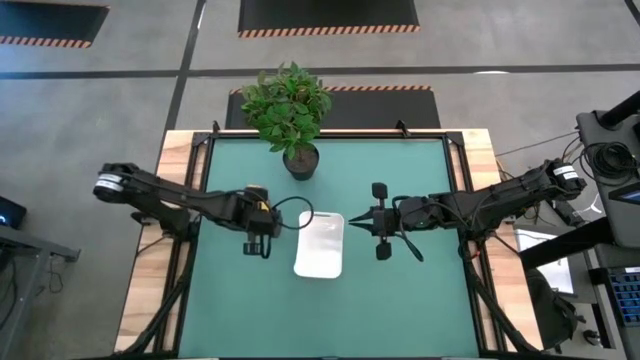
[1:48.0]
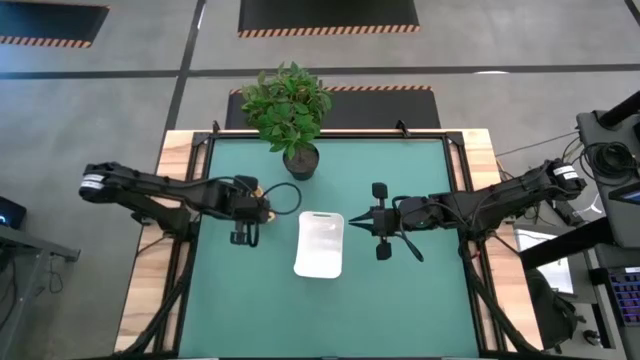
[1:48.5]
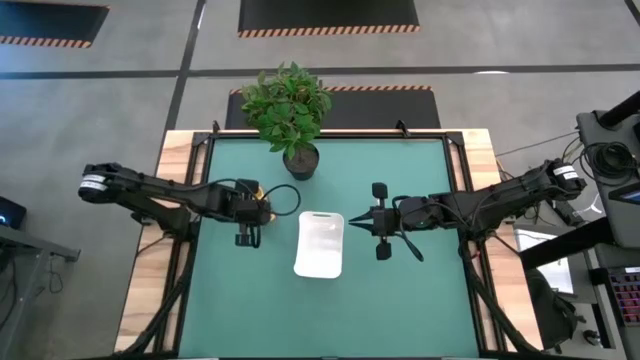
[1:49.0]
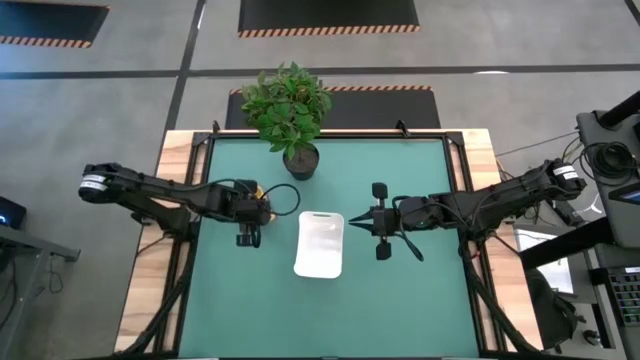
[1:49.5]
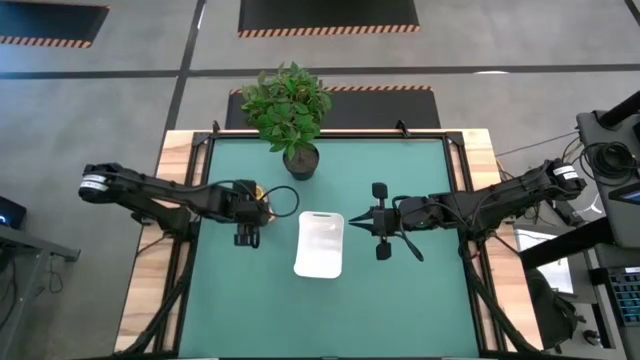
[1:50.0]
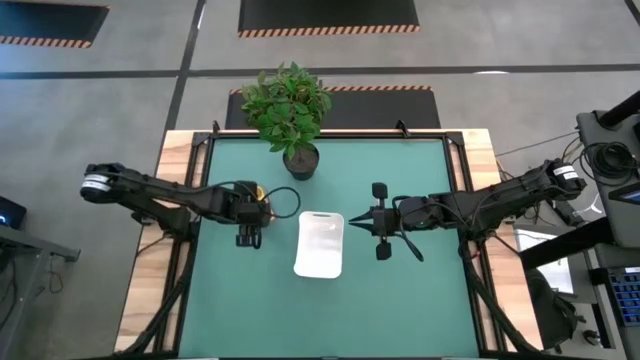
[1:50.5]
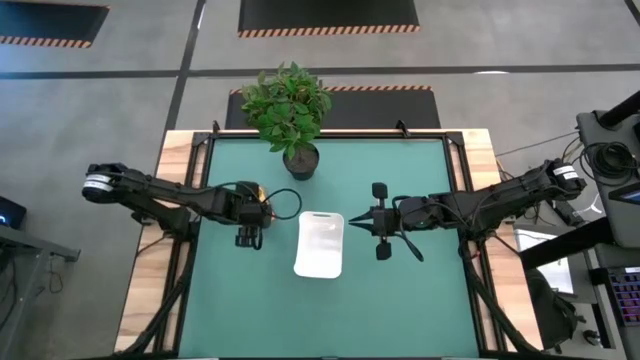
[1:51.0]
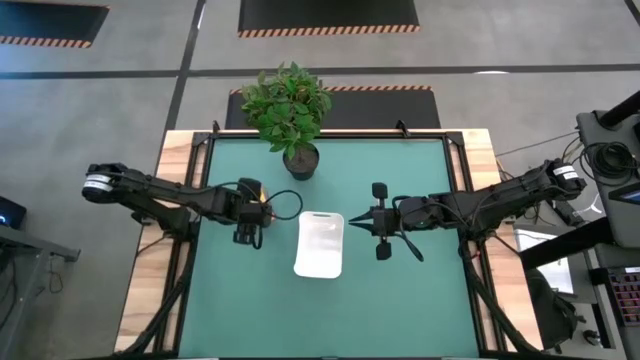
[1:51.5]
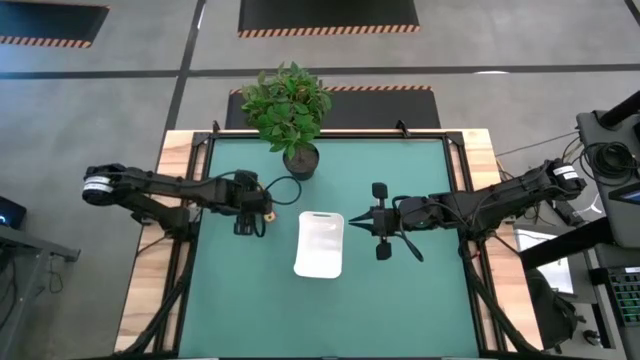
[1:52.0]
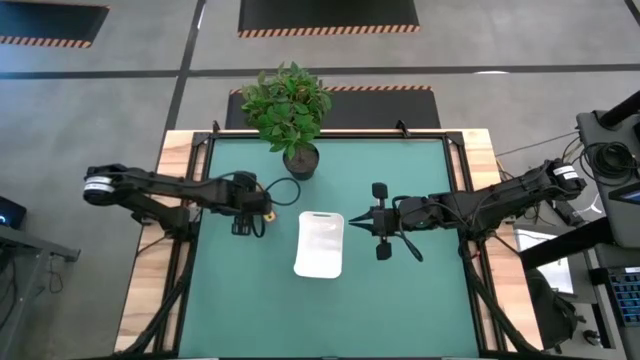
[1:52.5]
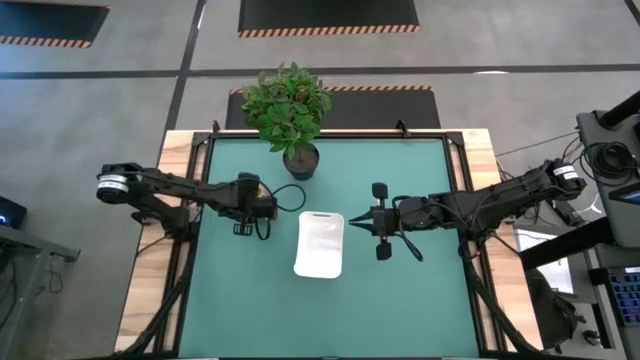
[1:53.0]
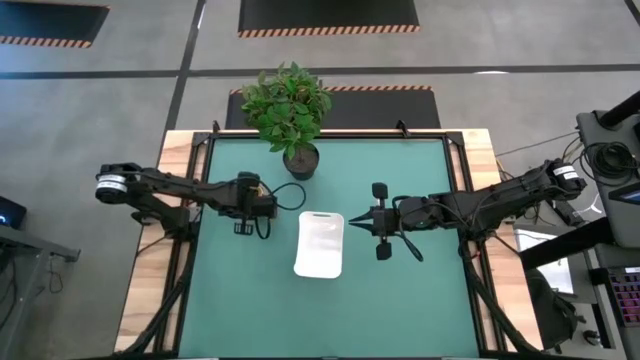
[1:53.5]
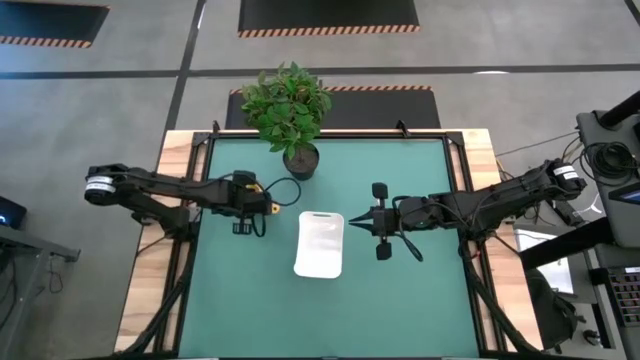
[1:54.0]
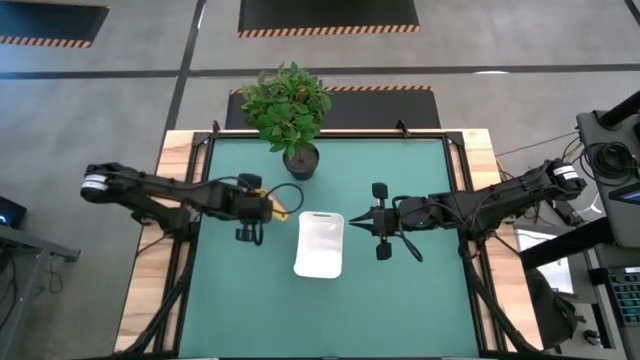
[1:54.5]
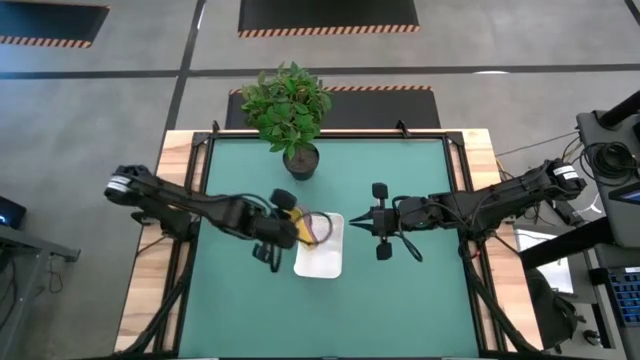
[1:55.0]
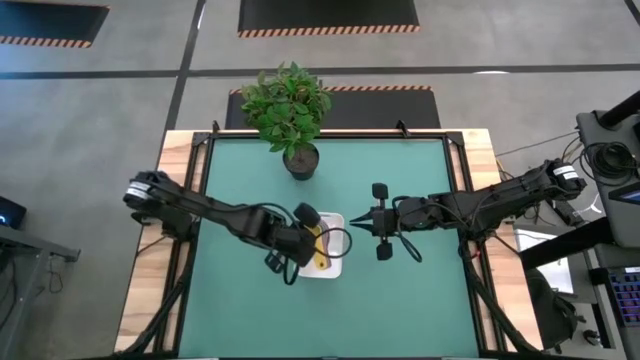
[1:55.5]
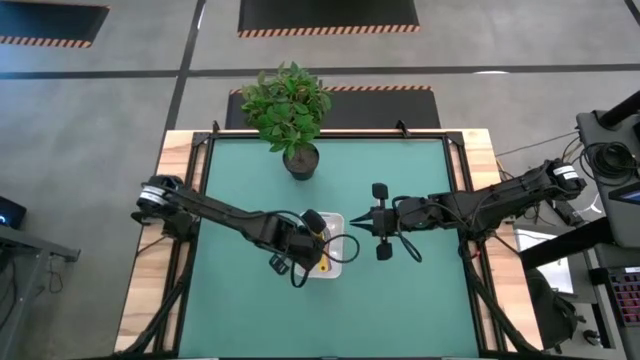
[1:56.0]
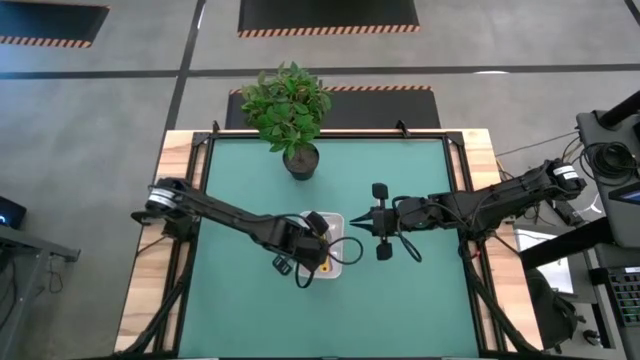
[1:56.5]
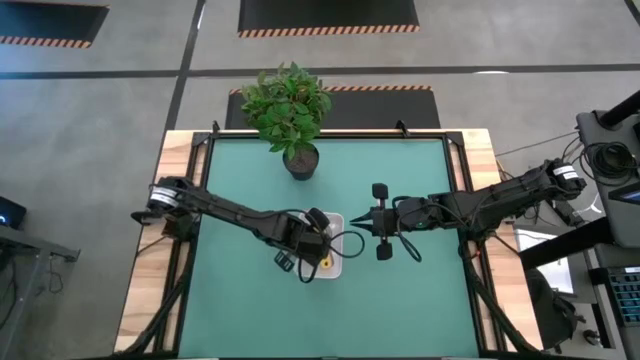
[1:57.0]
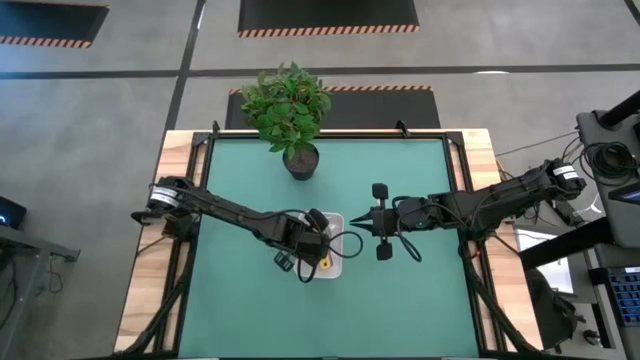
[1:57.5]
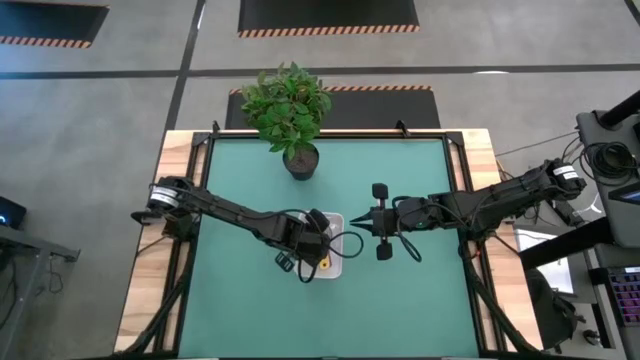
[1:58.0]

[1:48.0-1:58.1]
Task: Nest measuring cups in basket
Put the nested measuring cups into the white bin

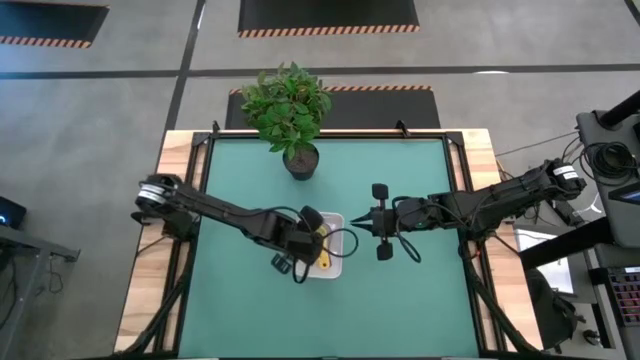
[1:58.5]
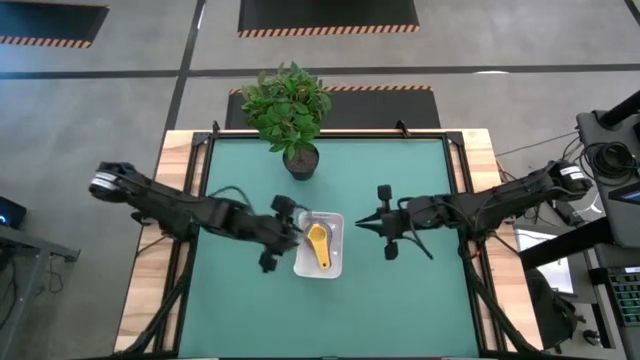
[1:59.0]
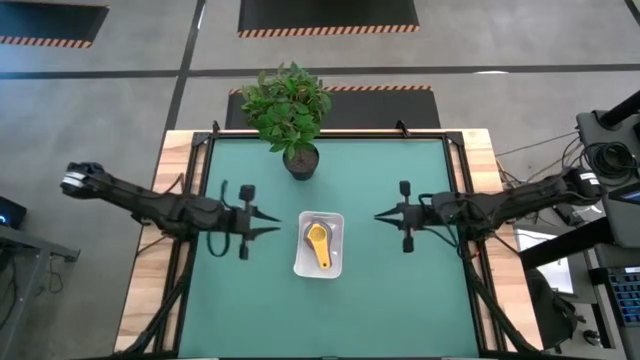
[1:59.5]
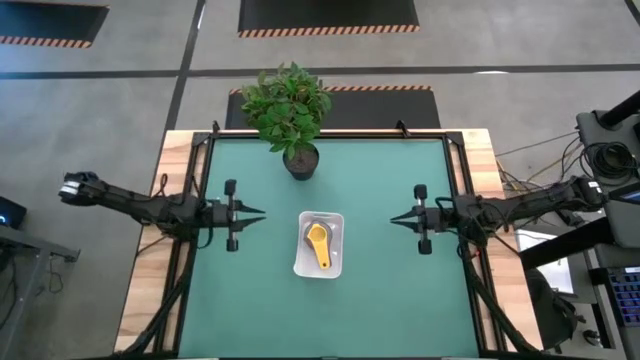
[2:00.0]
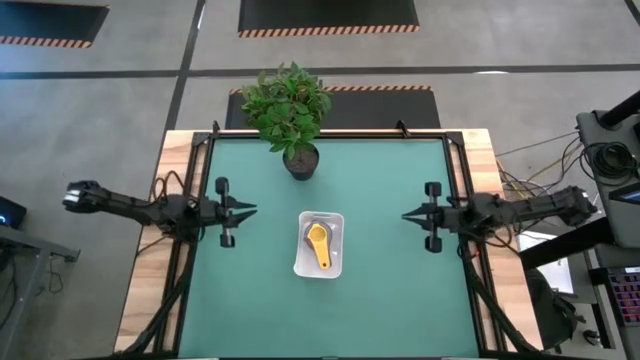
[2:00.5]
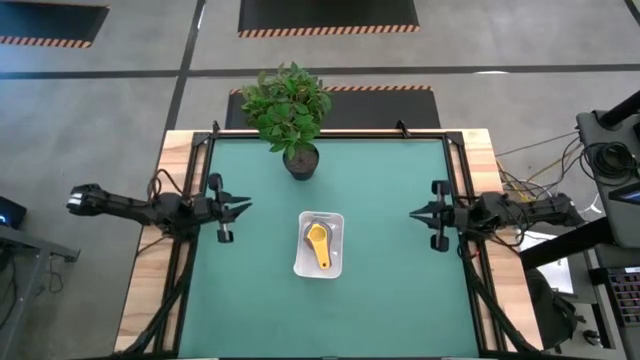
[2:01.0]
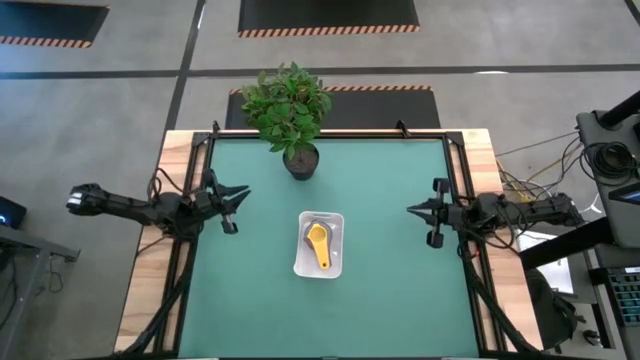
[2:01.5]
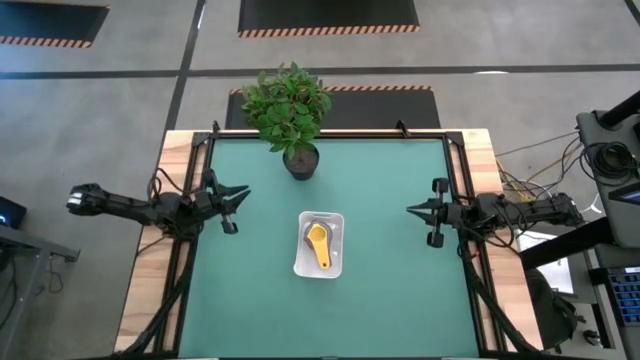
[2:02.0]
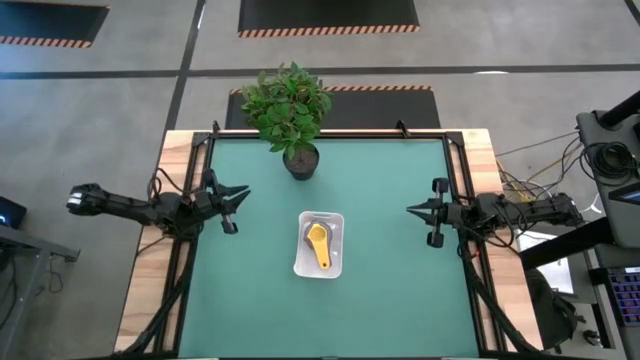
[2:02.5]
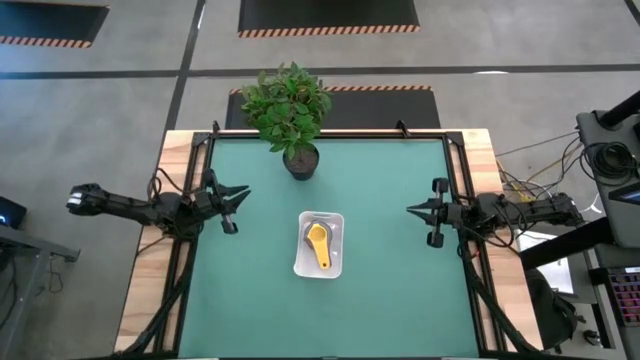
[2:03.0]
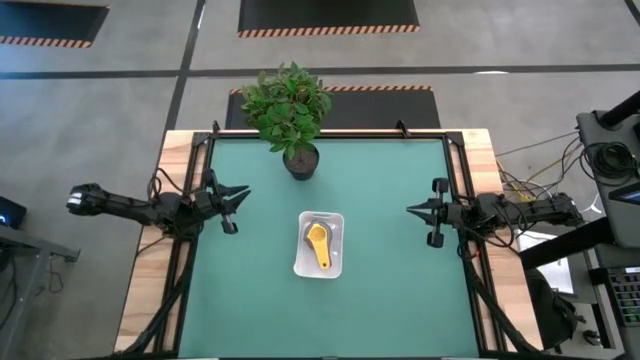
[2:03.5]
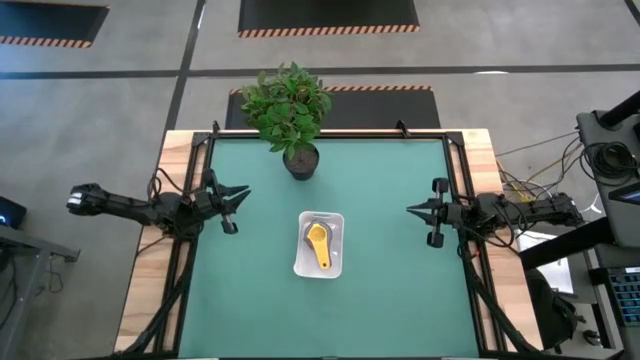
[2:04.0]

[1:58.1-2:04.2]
Return to Home Position

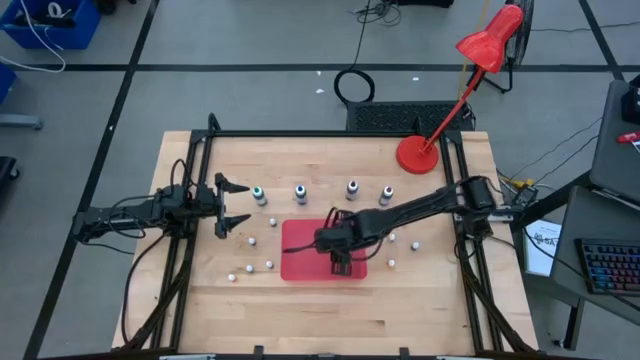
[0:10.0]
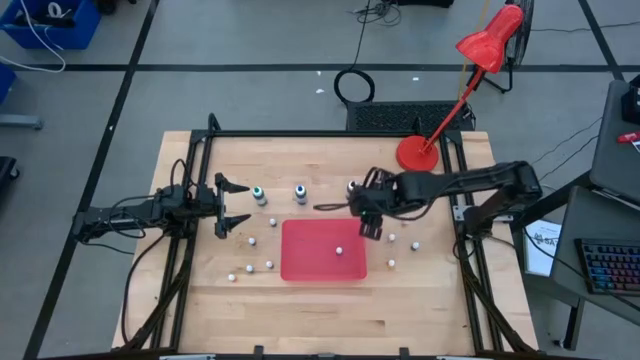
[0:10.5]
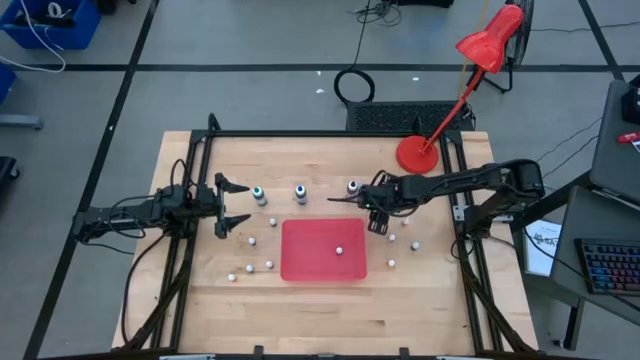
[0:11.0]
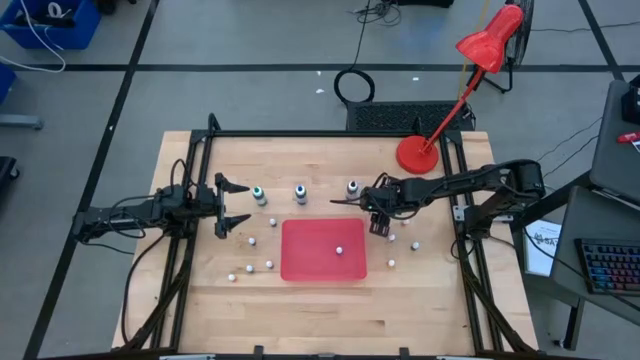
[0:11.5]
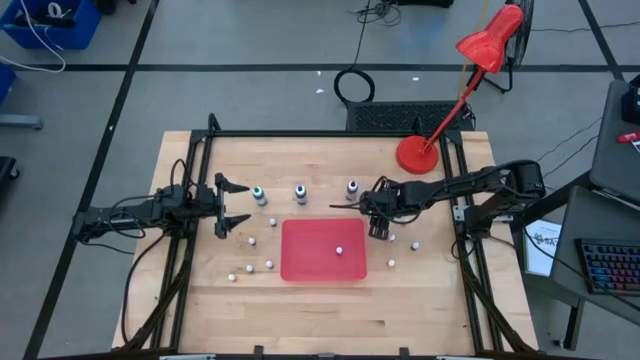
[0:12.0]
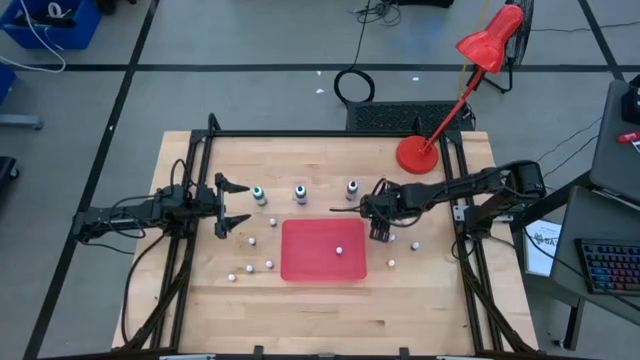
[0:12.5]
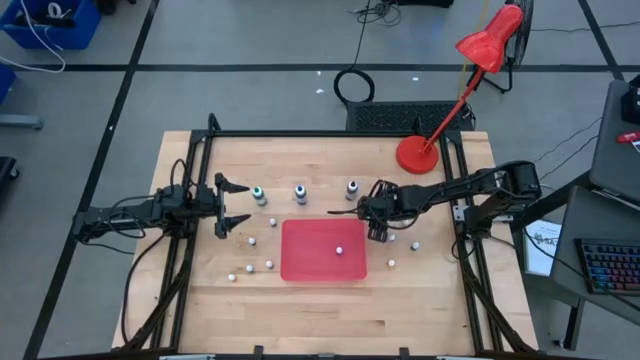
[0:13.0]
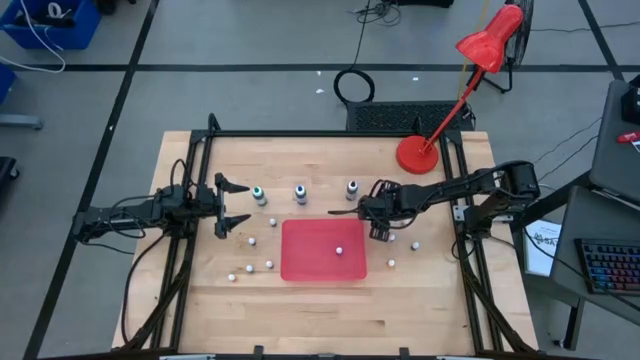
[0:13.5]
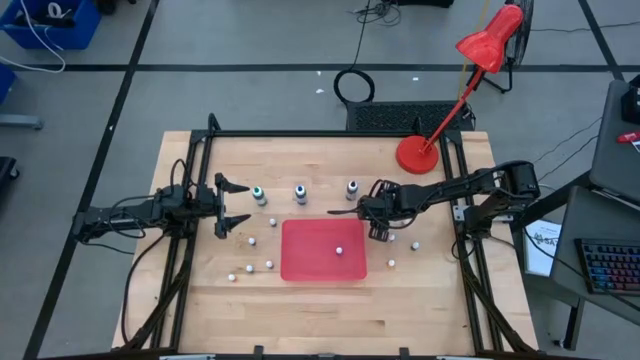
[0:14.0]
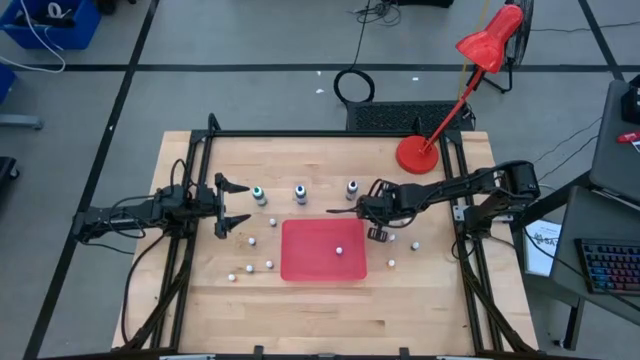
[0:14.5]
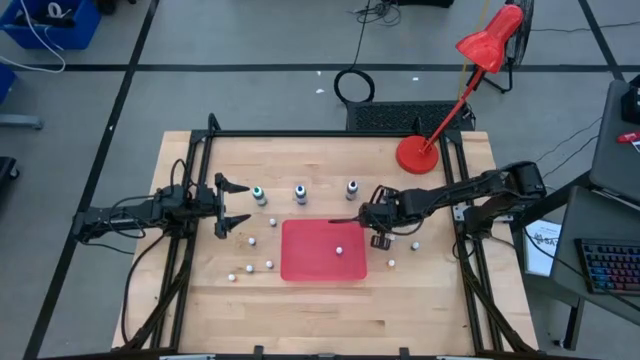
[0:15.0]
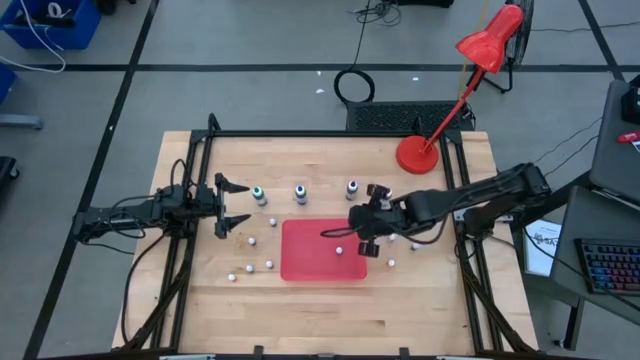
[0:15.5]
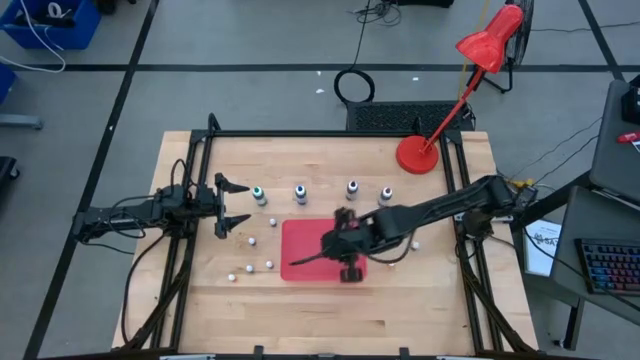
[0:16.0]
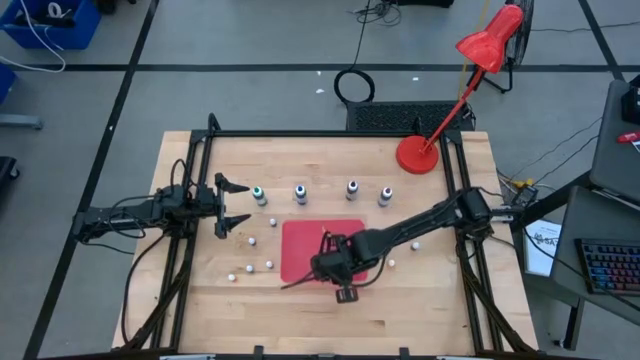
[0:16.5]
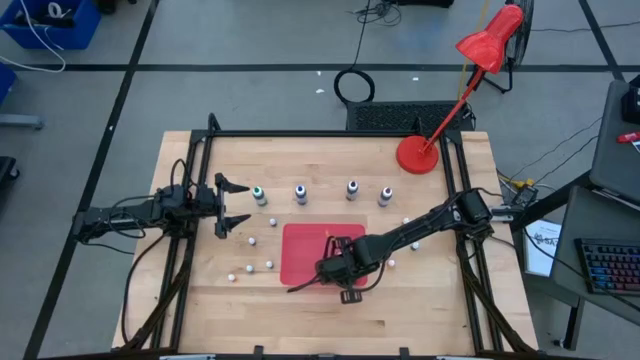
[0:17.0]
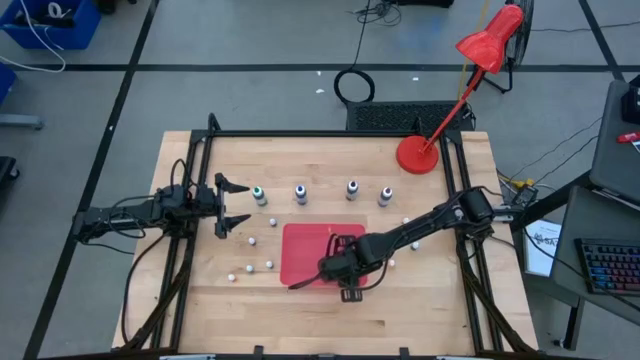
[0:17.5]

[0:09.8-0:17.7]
Task: Pick & Place food coloring
Put the small orange food coloring bottle into the pink bin
